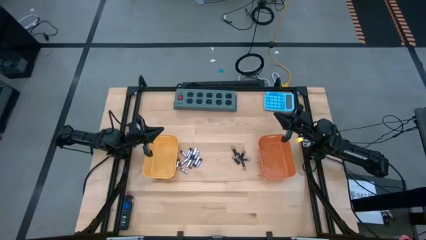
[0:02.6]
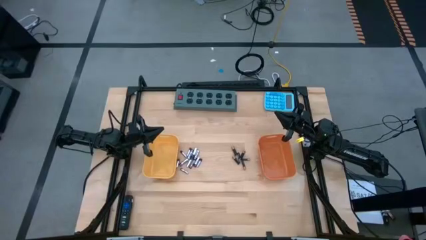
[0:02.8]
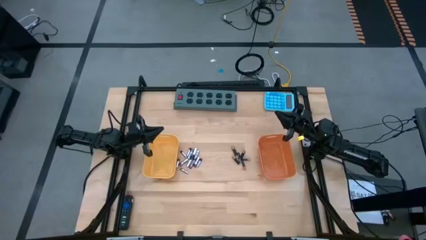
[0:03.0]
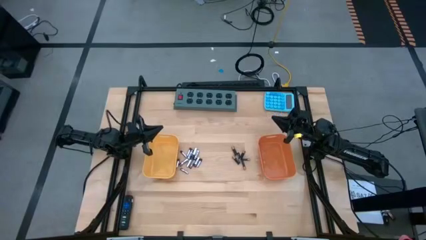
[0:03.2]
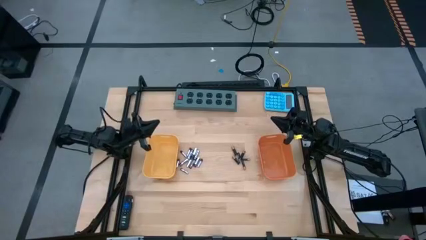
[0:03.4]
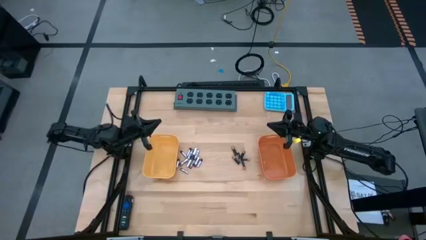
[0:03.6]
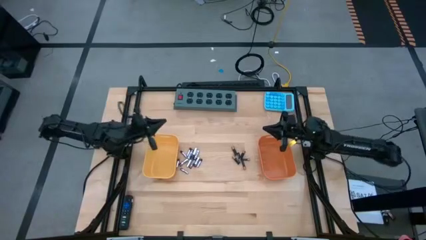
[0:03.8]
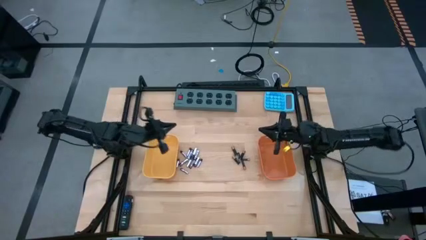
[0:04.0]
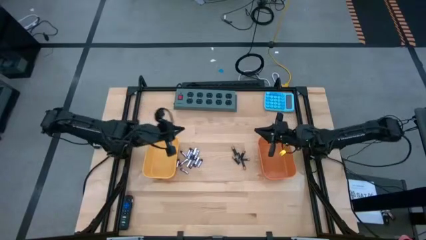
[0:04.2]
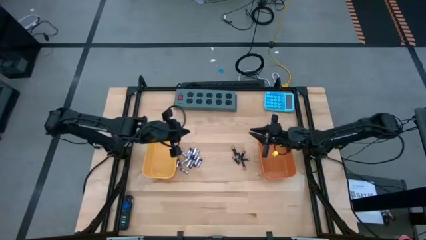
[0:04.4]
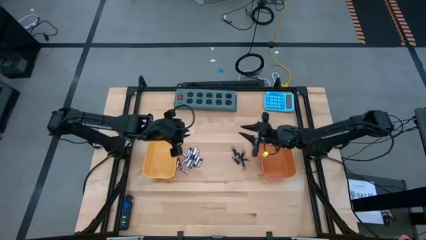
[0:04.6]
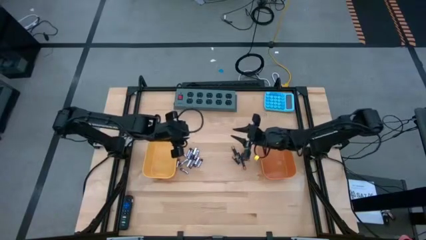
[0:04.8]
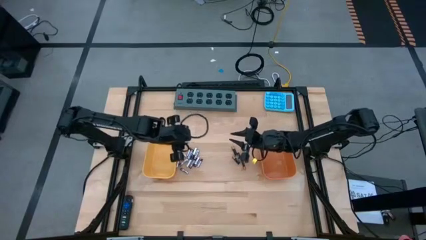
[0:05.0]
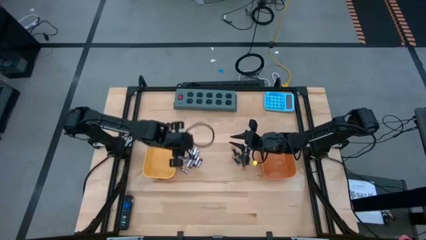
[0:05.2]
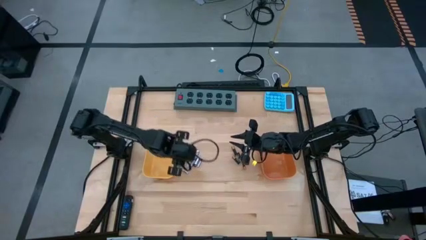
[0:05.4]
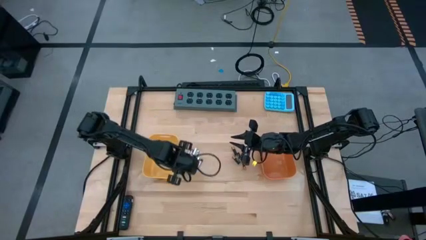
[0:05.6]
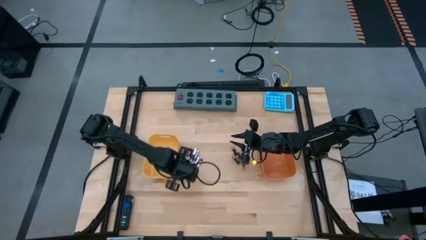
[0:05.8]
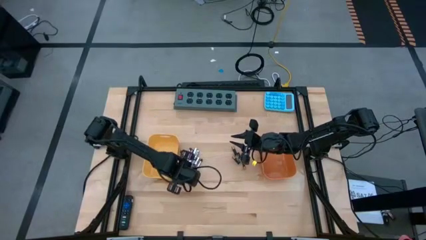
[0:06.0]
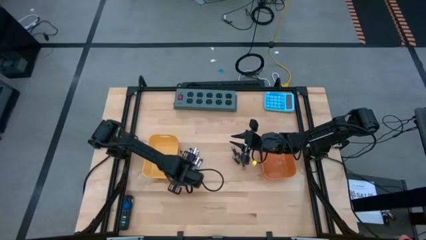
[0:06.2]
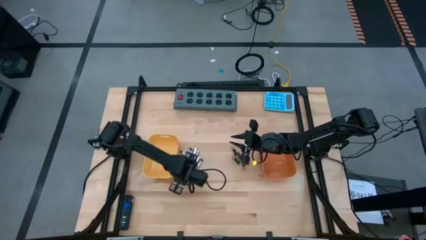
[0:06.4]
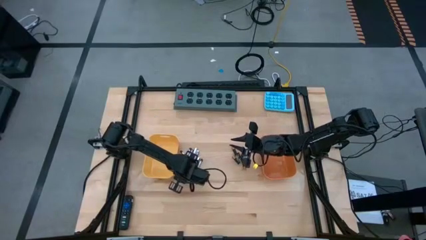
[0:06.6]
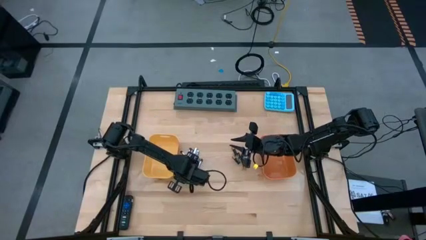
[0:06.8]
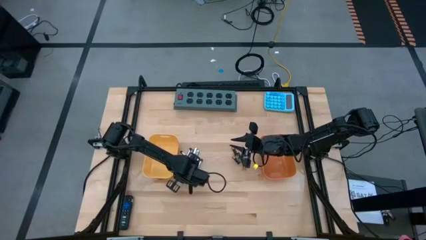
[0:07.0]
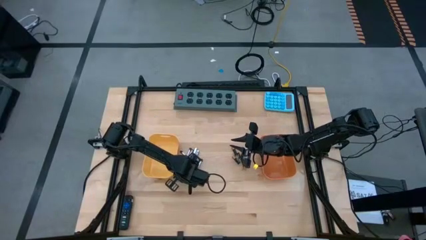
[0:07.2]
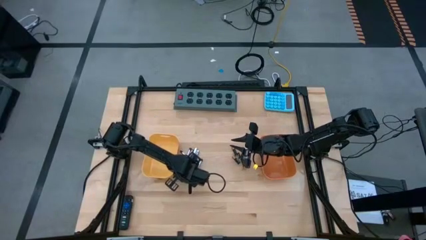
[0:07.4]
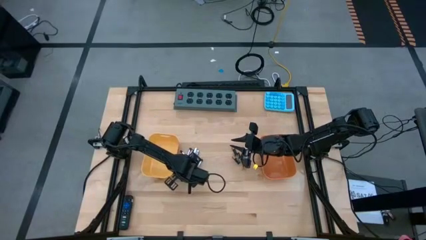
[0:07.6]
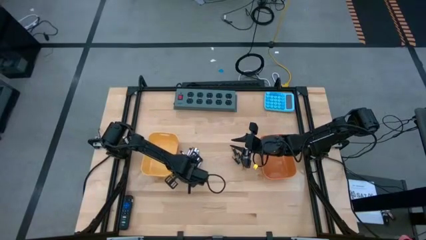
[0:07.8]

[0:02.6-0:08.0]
Task: Sort batteries
Put the silver battery into the yellow bin

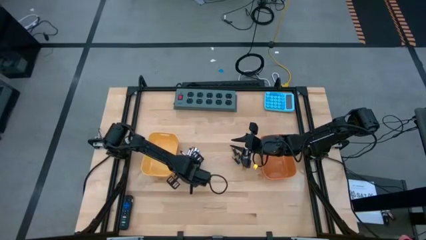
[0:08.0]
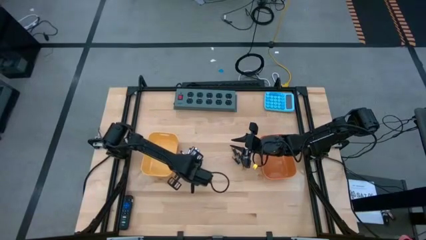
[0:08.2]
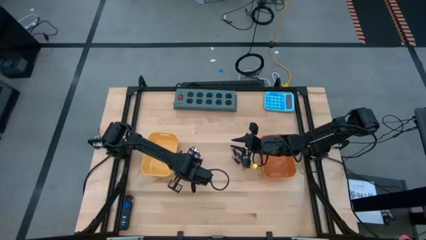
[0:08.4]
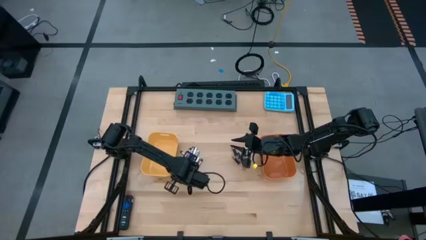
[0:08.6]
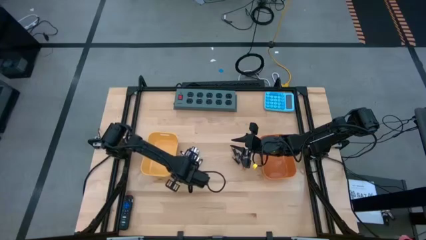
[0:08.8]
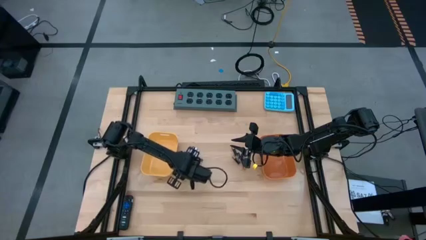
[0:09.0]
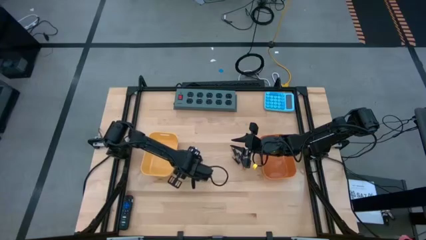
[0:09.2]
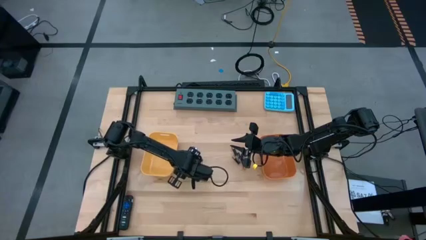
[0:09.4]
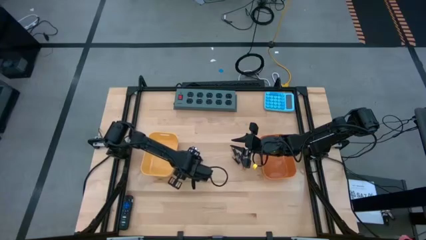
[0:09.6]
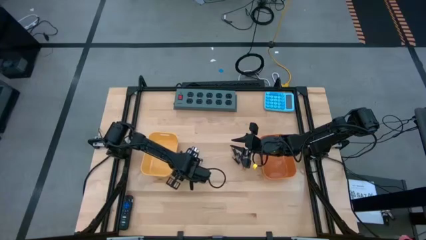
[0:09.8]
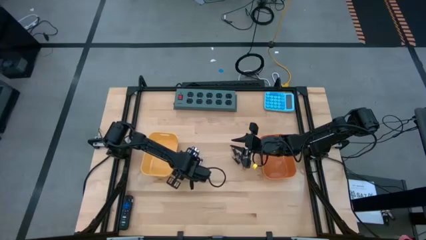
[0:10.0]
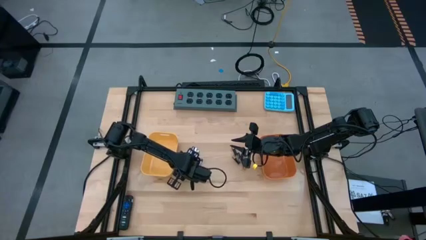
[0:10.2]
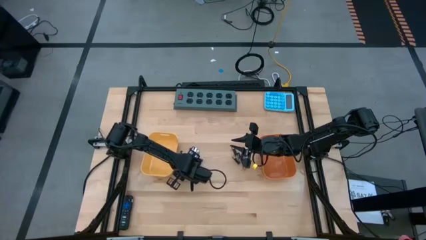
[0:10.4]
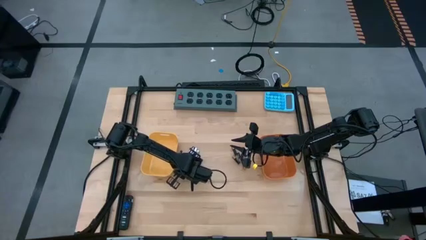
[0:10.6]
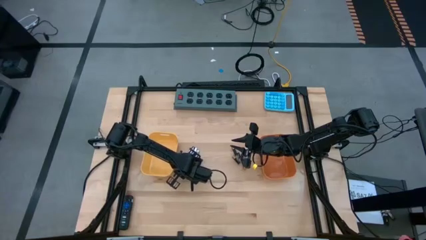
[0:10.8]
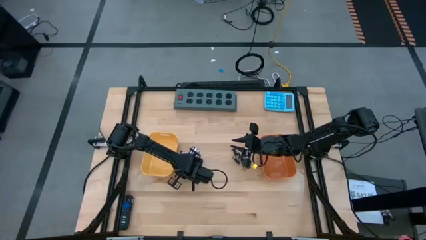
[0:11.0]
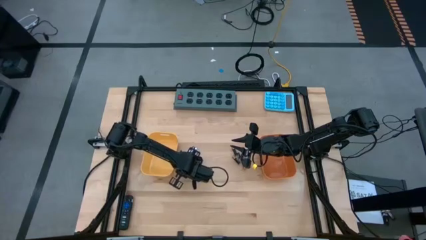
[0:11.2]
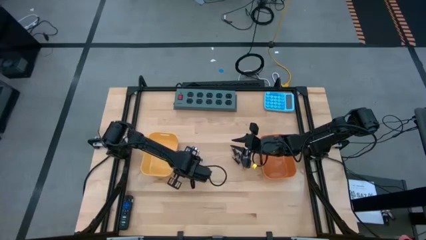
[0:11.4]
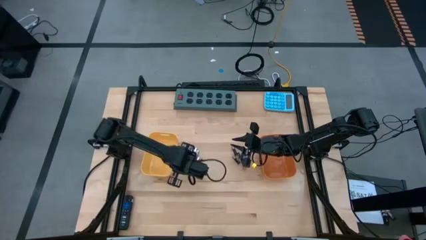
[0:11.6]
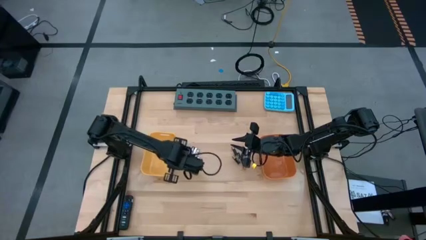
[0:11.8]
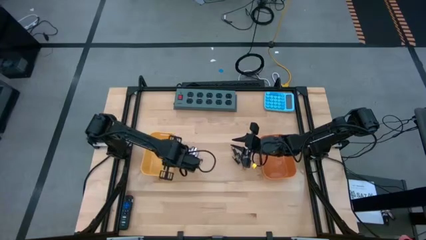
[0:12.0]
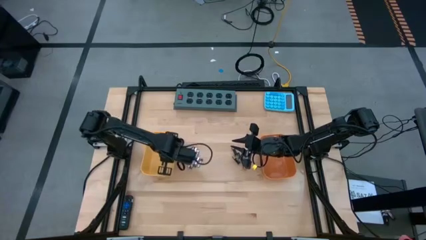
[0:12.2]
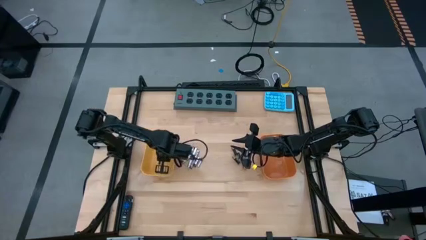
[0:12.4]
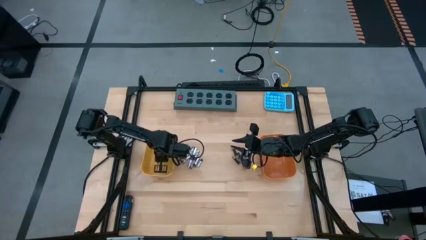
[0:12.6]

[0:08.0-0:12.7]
Put the silver battery into the yellow bin

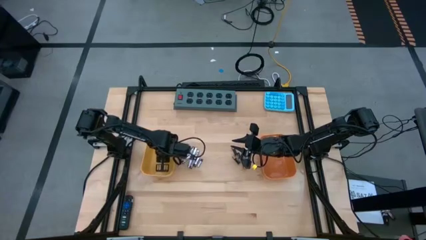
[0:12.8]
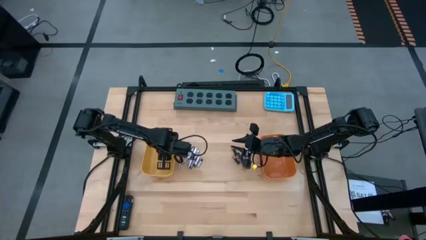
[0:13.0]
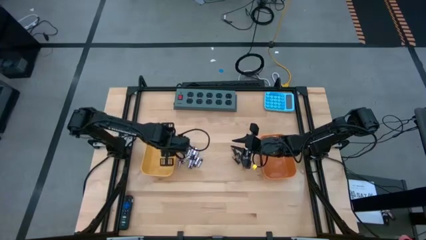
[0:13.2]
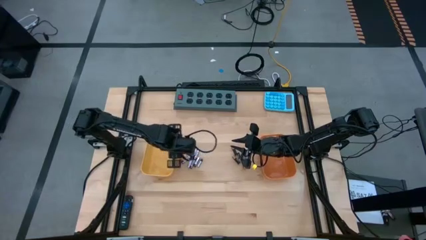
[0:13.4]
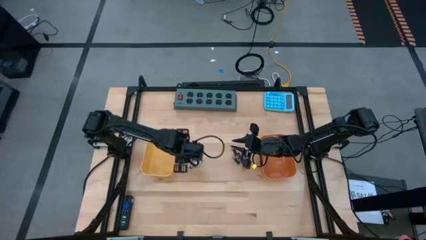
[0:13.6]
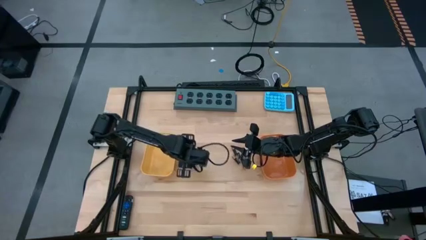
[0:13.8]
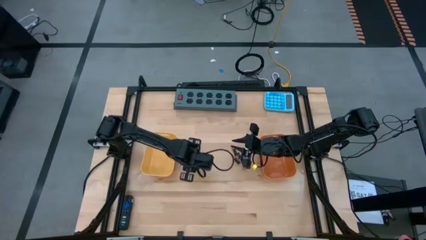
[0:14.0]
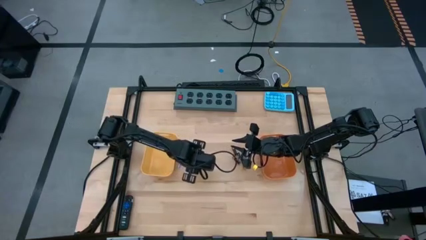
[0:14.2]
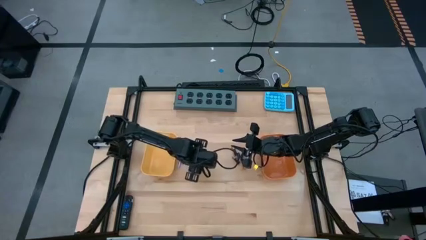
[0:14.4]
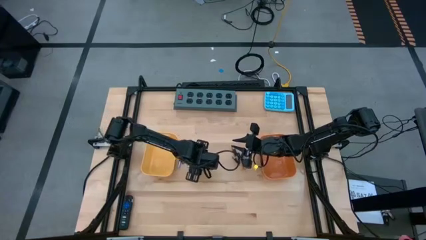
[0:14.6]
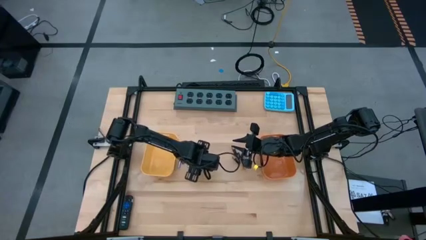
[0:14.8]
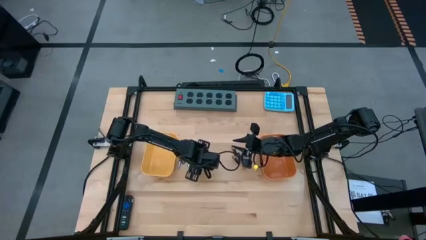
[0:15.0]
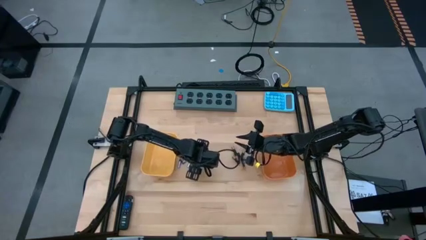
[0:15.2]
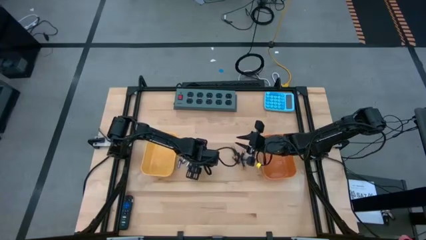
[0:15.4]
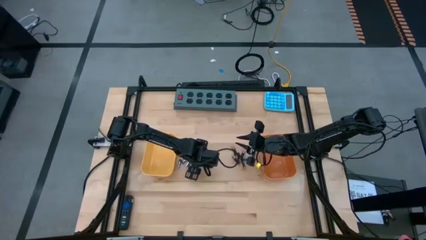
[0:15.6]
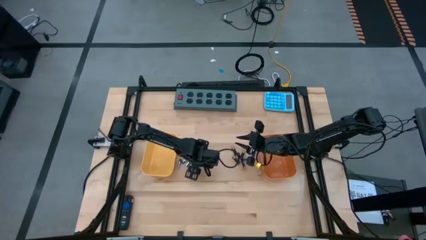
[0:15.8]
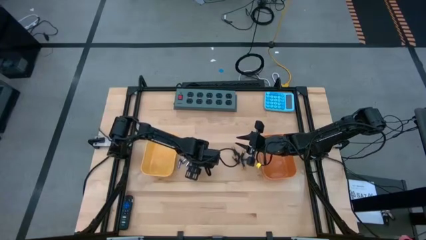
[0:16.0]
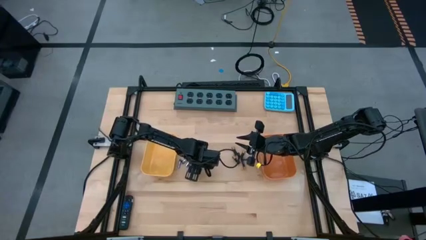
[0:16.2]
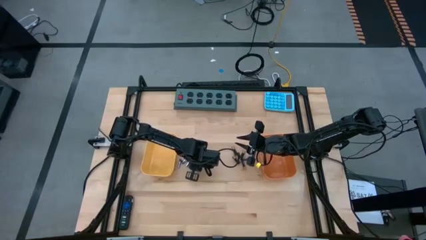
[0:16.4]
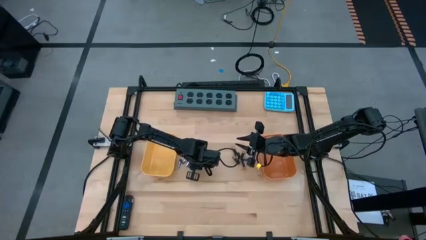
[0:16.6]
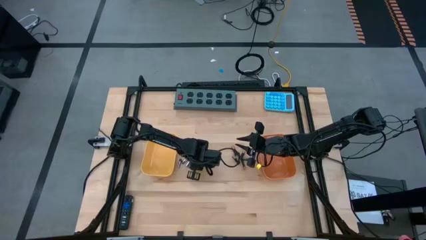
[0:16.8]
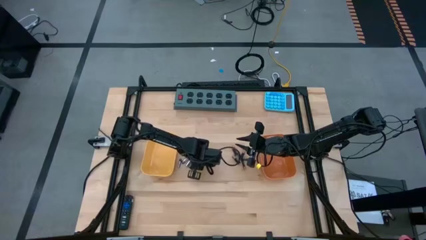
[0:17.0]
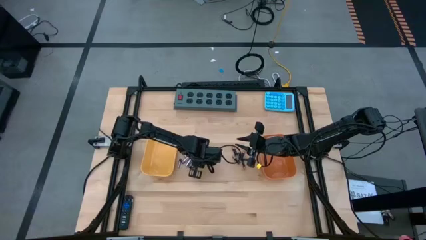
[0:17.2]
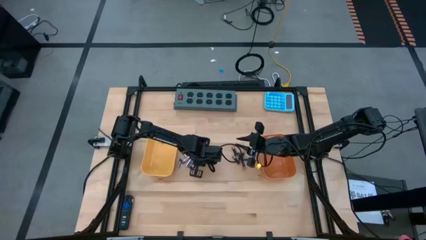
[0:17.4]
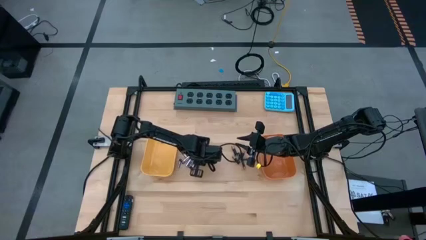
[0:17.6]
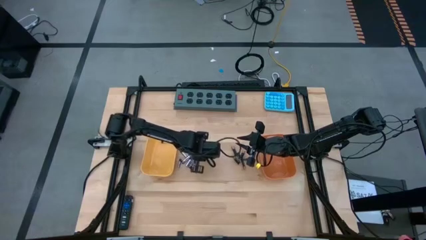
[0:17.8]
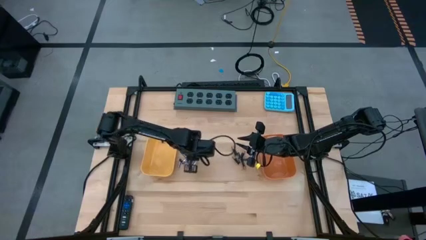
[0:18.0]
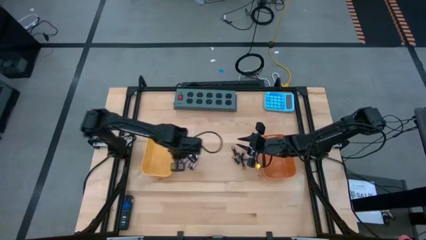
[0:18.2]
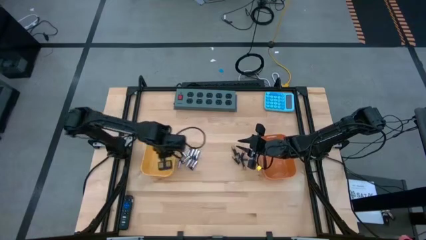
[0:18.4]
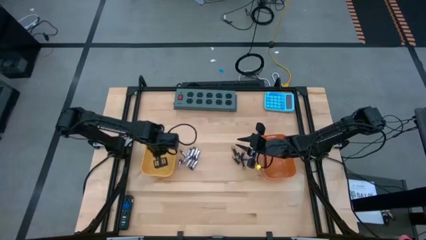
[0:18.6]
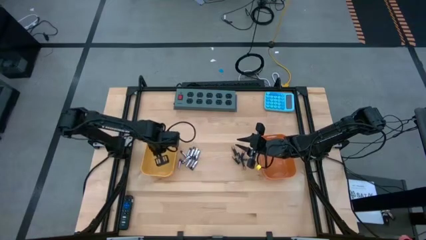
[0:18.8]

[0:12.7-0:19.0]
Put the silver battery into the yellow bin

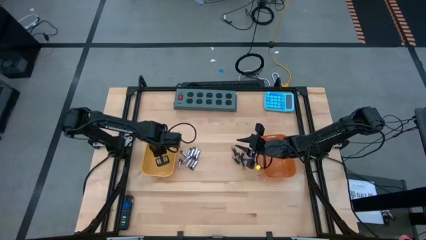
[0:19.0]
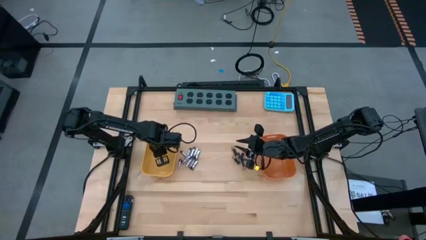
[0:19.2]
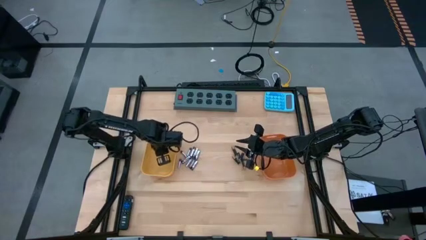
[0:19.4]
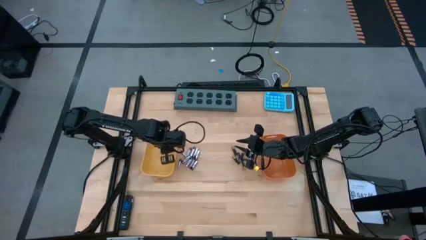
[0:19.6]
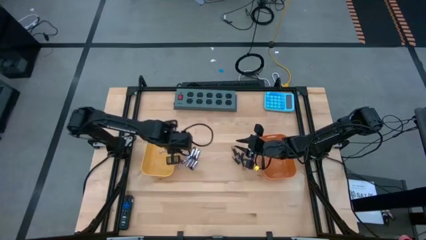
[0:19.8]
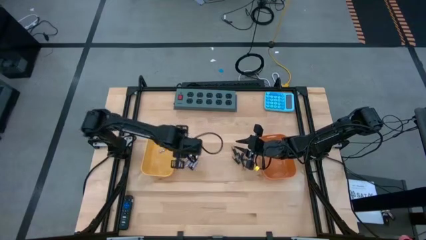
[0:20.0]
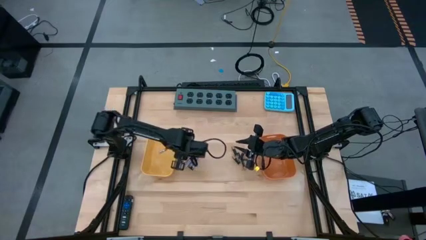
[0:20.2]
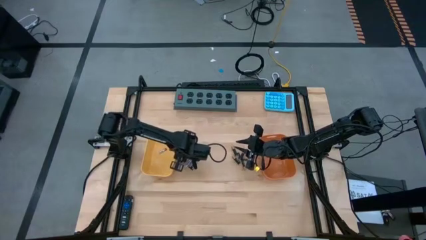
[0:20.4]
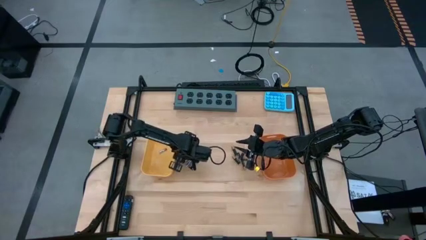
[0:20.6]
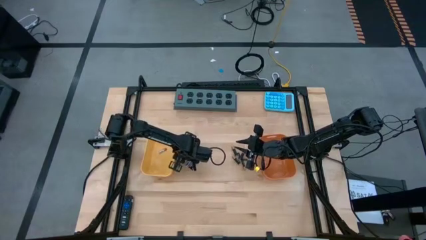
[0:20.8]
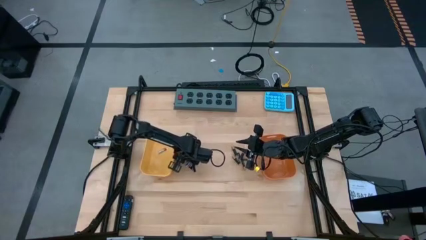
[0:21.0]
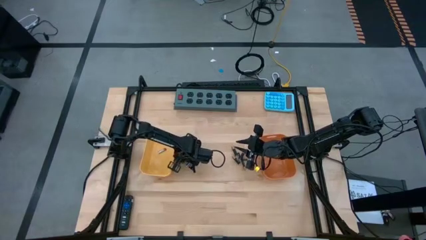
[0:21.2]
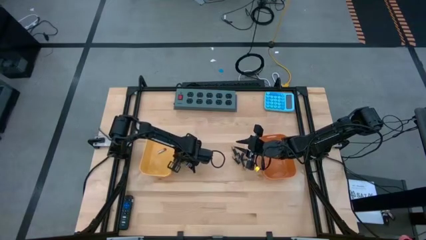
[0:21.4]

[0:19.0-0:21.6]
Put the silver battery into the yellow bin
